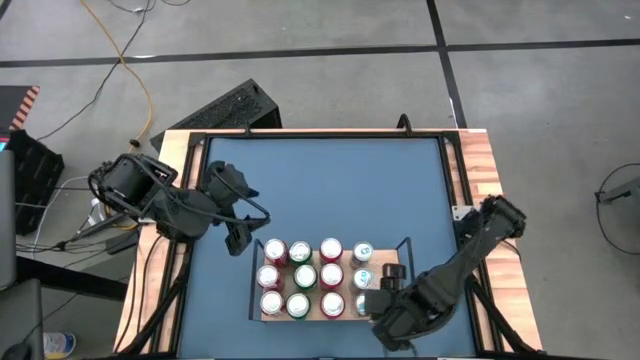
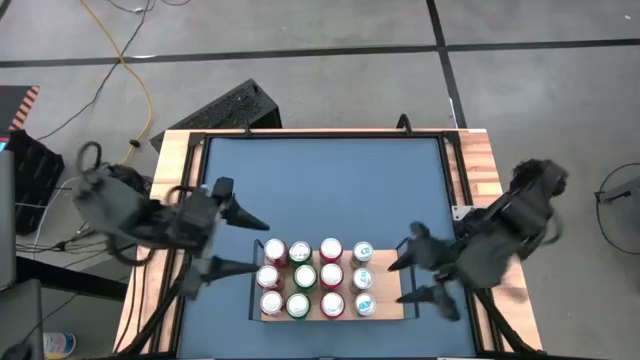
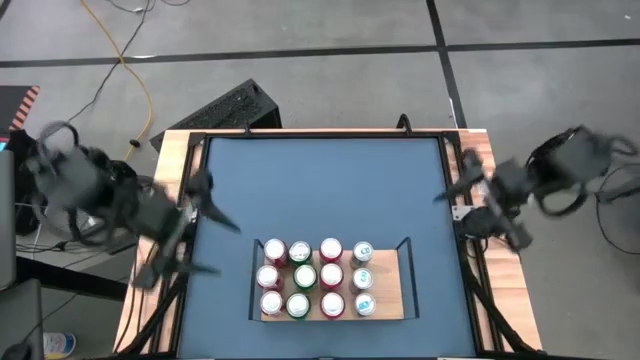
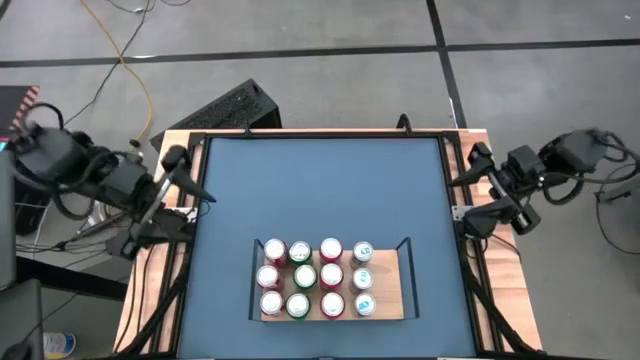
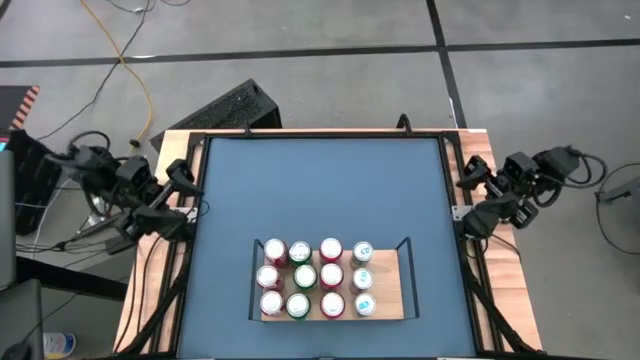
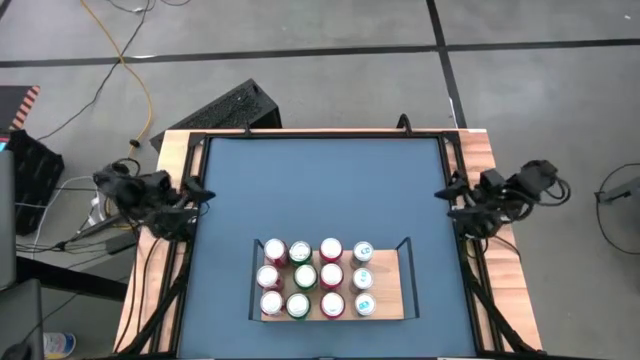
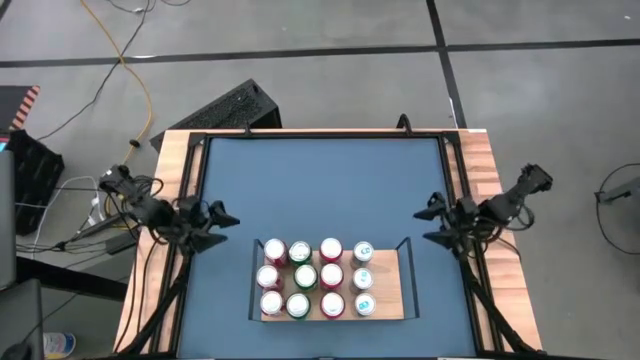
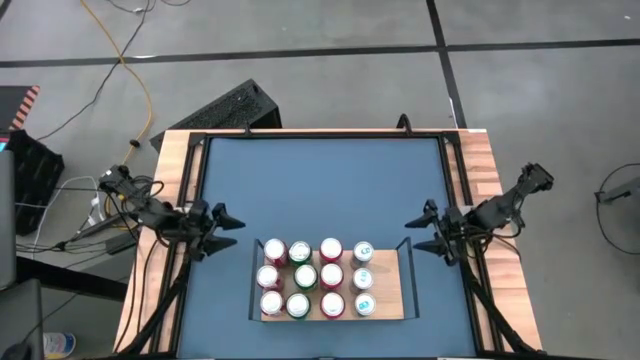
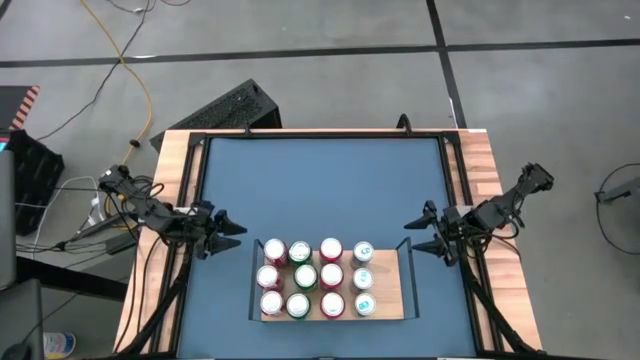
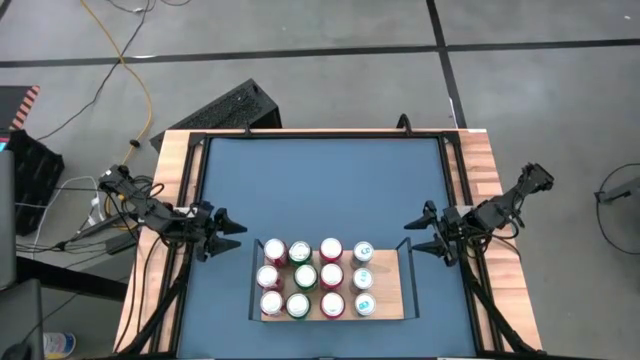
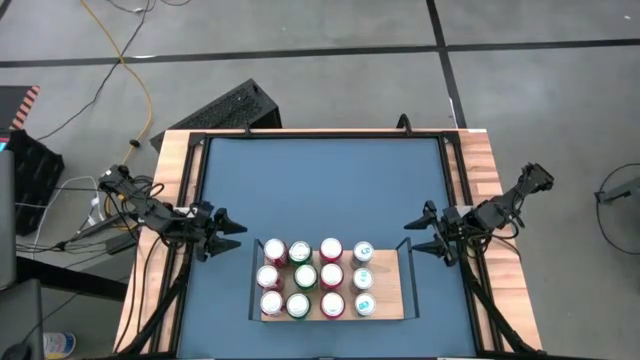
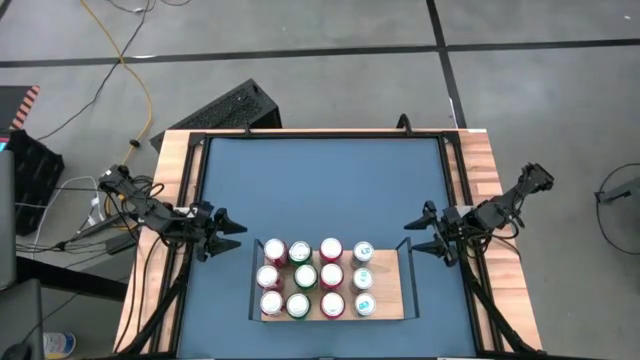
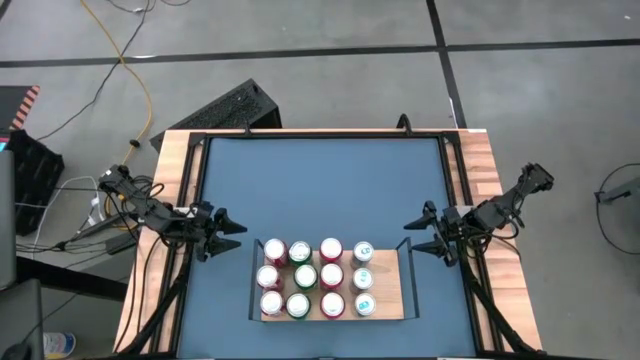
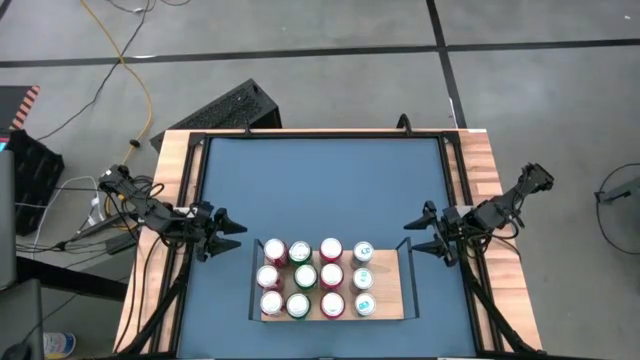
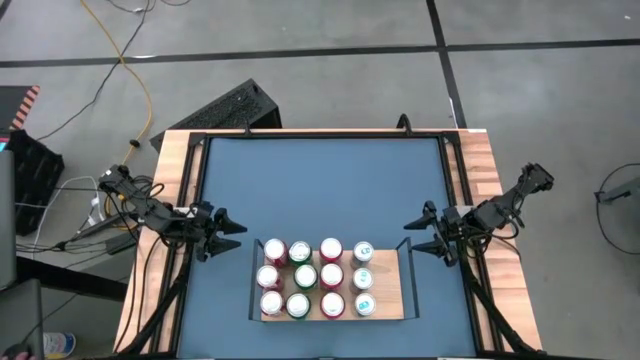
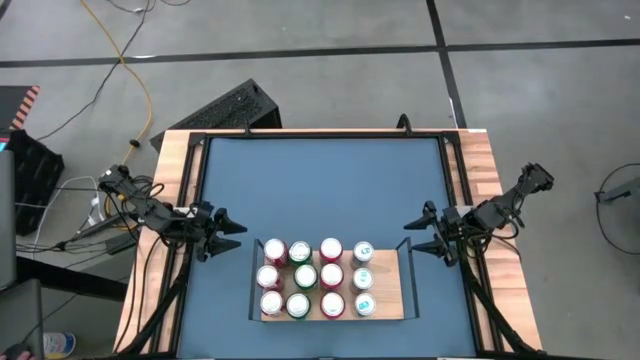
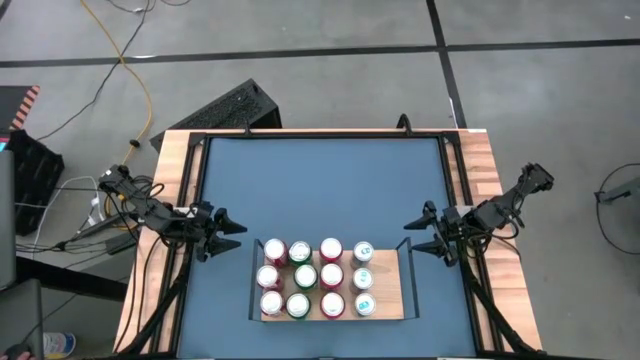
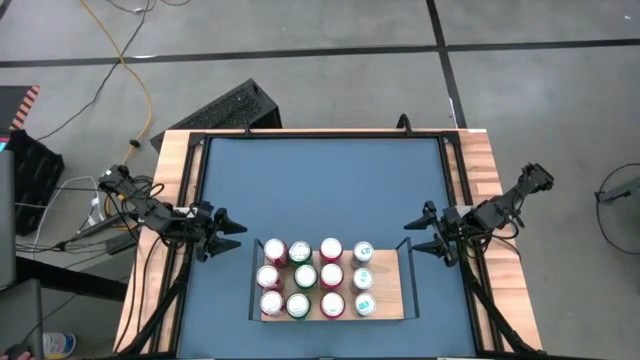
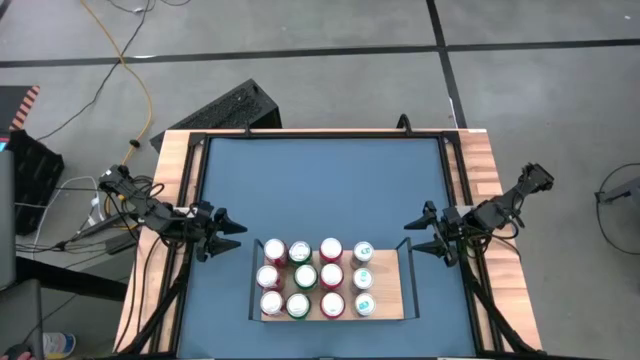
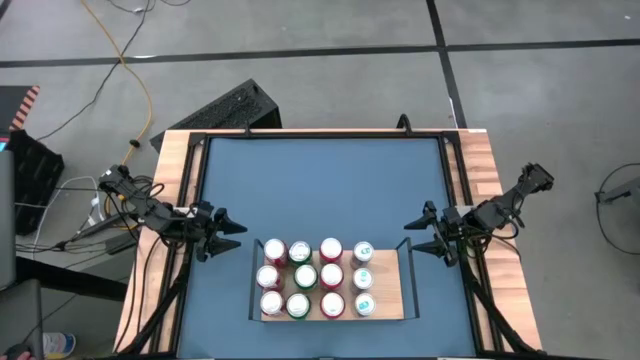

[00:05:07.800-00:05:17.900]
Task: Place canned beverage on shelf
Return to Home Position

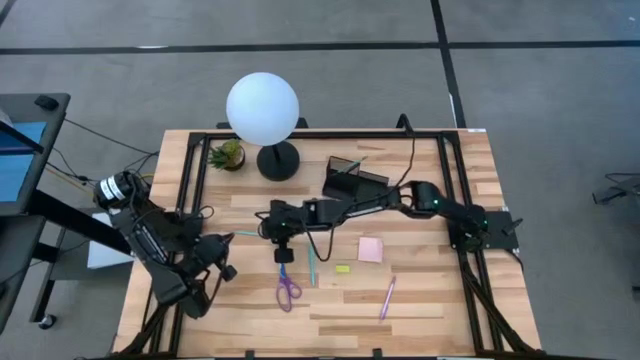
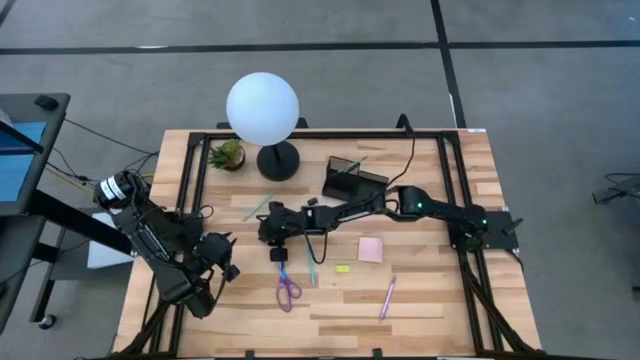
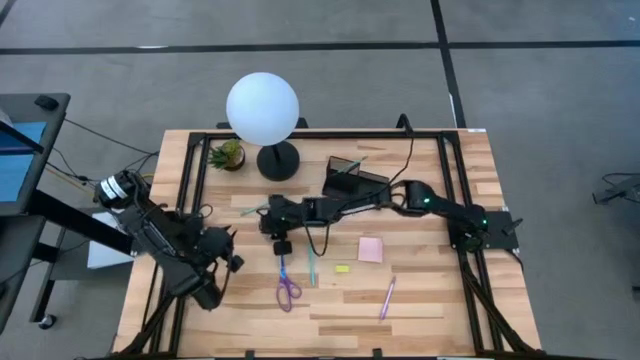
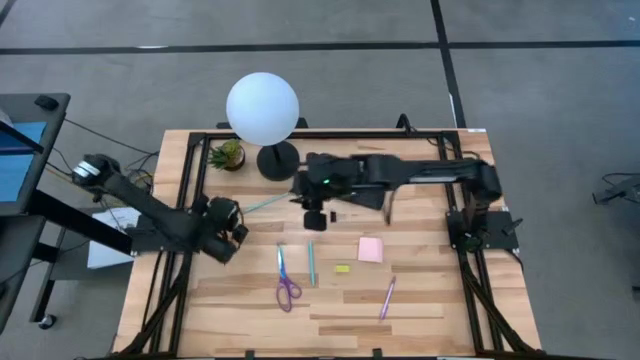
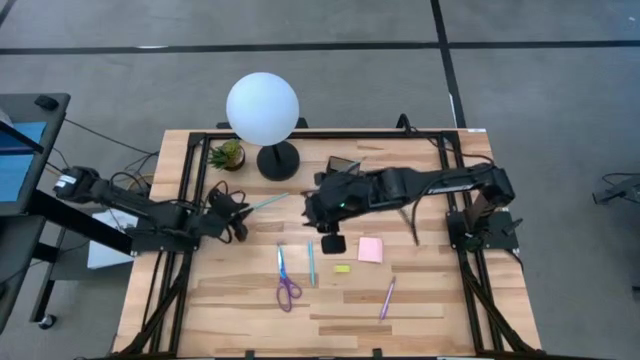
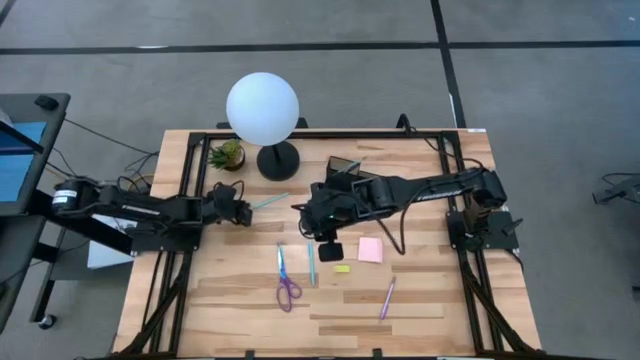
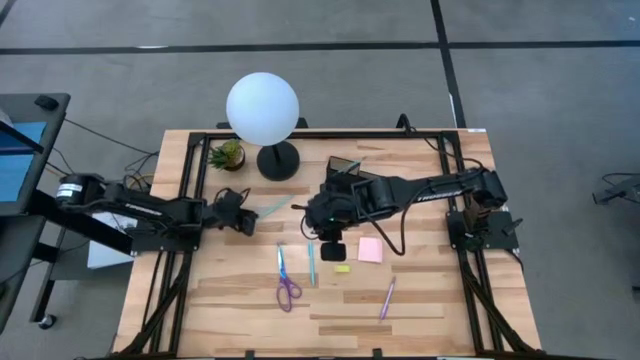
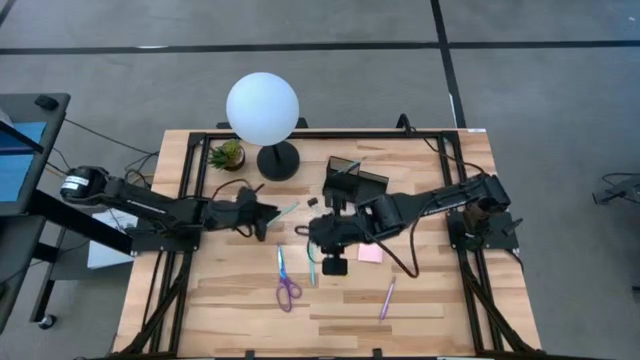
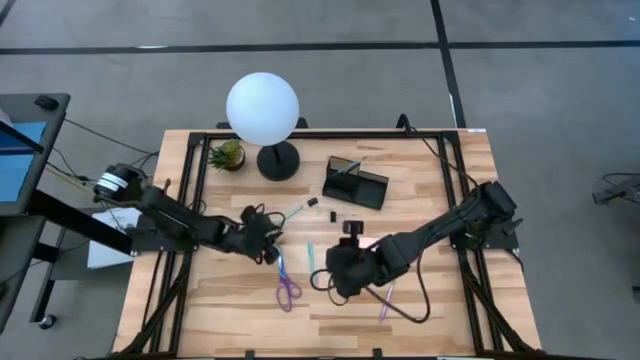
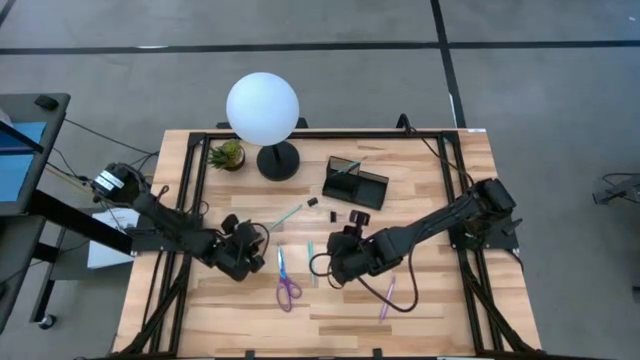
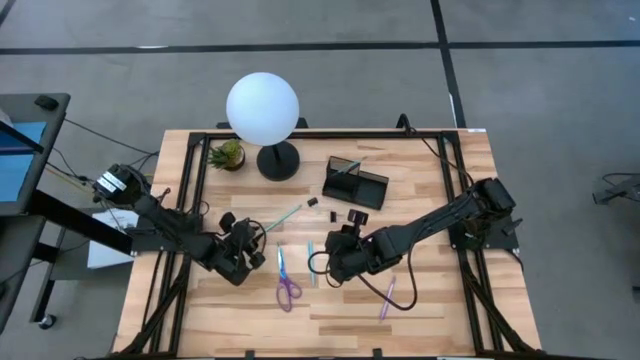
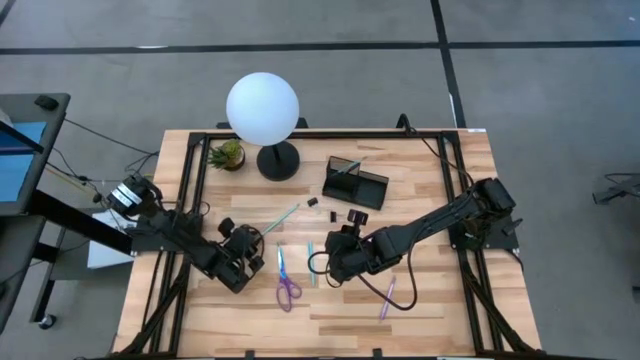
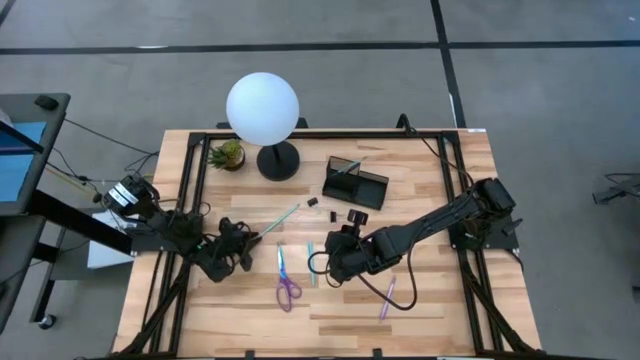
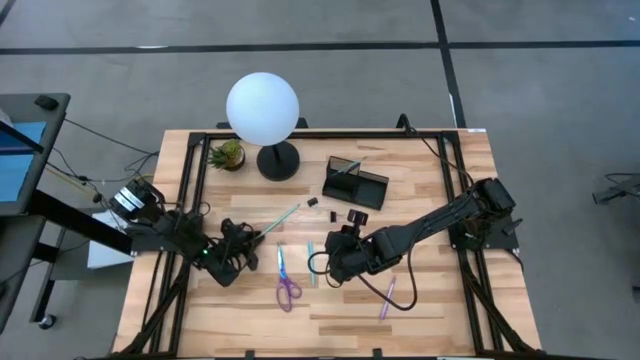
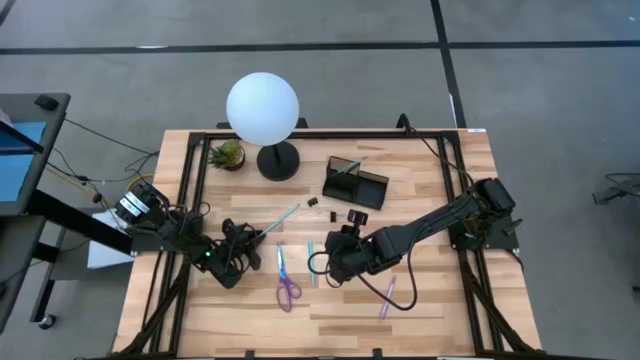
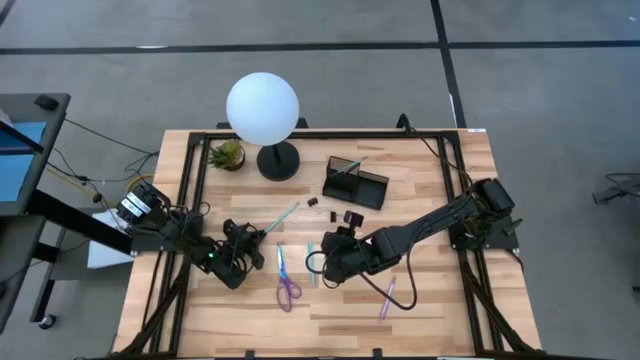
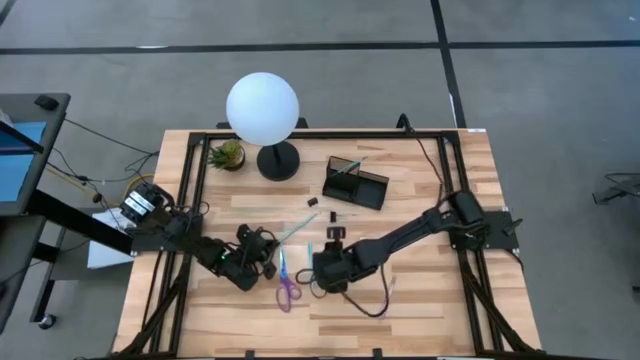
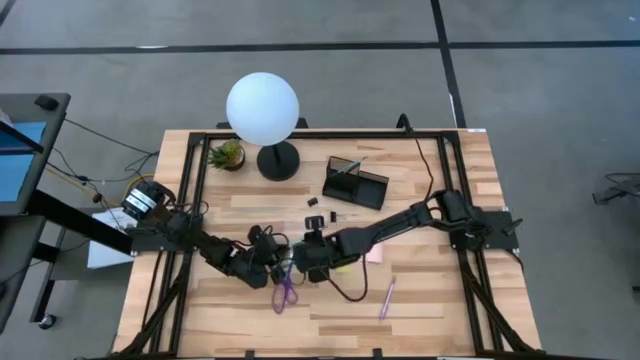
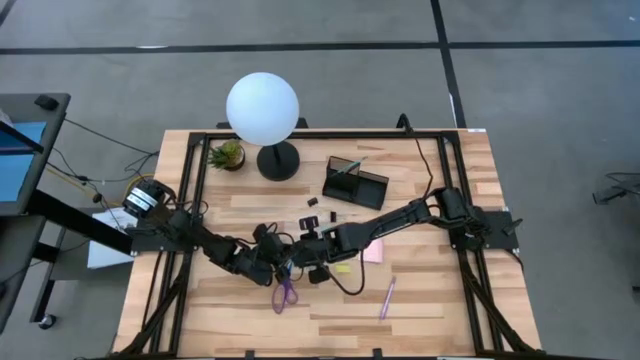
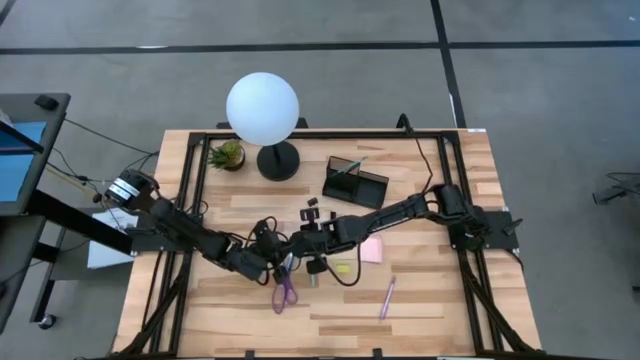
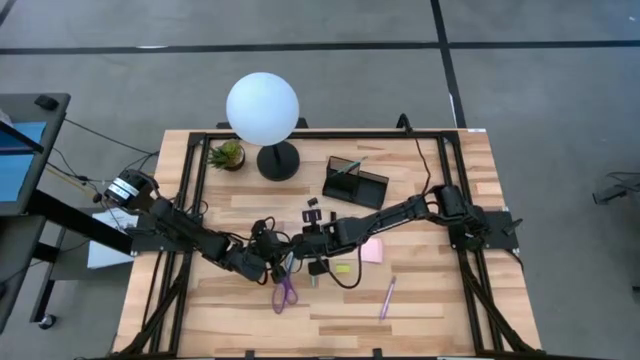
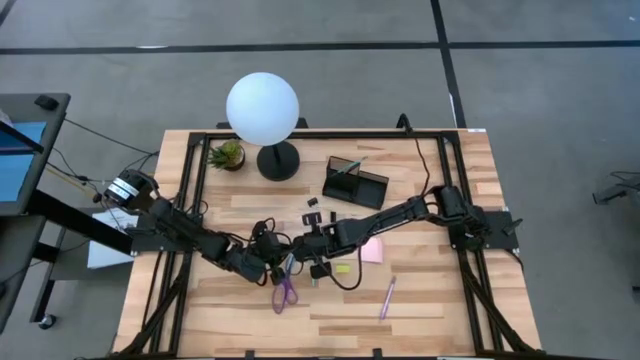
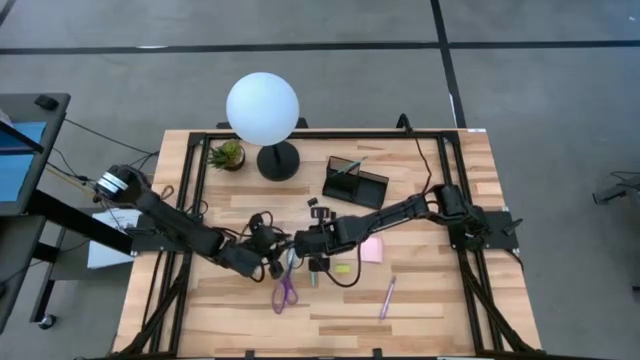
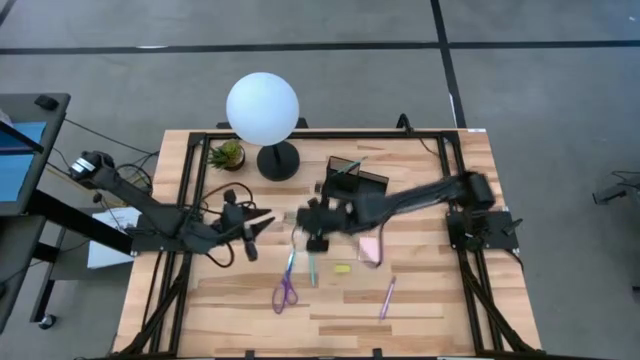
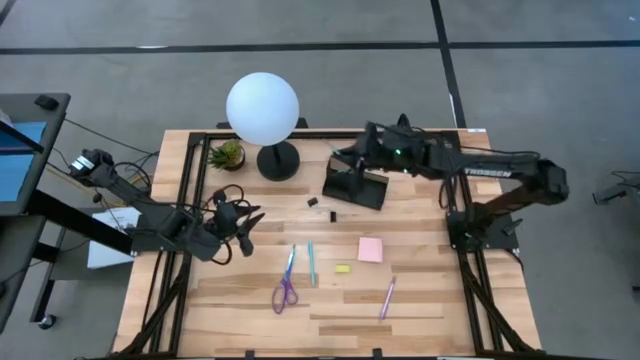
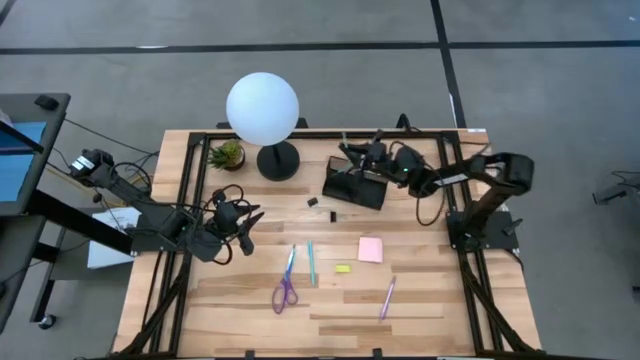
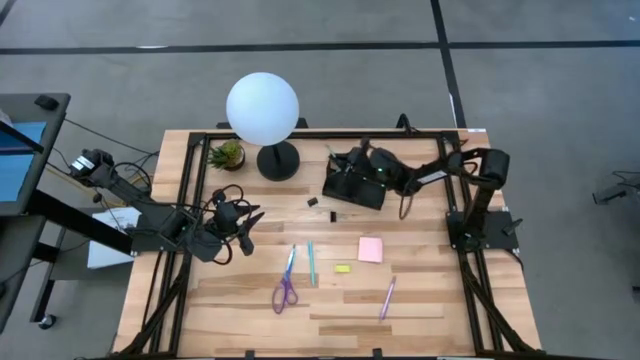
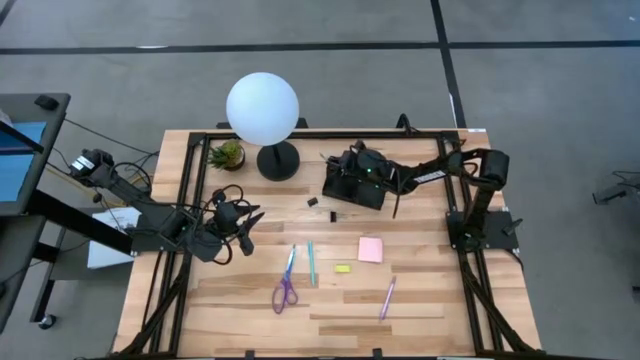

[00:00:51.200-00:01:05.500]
Task: Pick and place office supplies into organizer
Put the blue pencil into the black desk organizer
